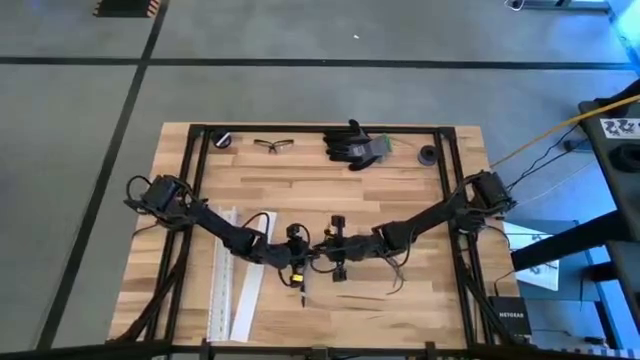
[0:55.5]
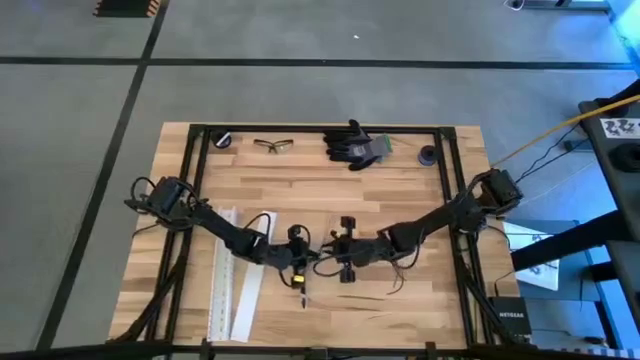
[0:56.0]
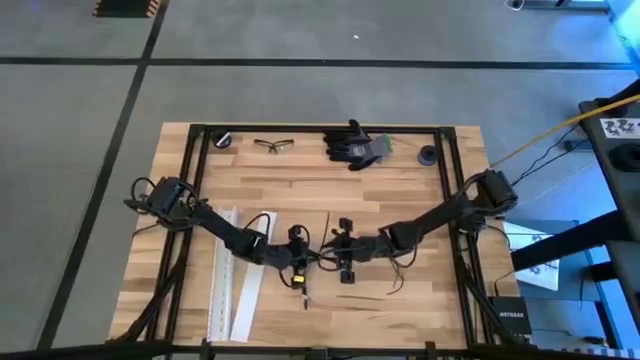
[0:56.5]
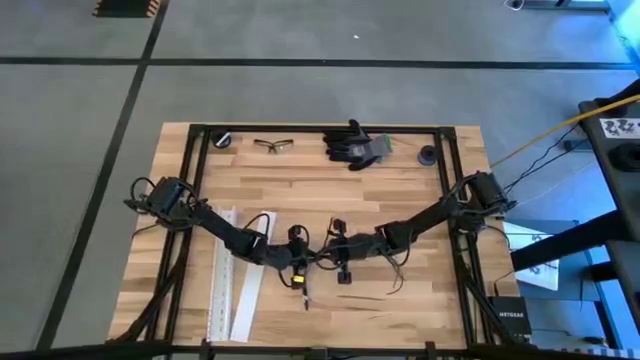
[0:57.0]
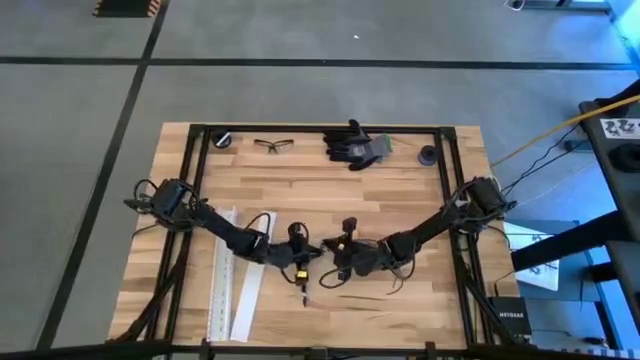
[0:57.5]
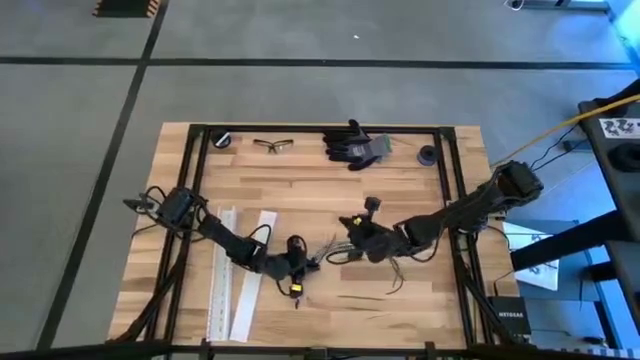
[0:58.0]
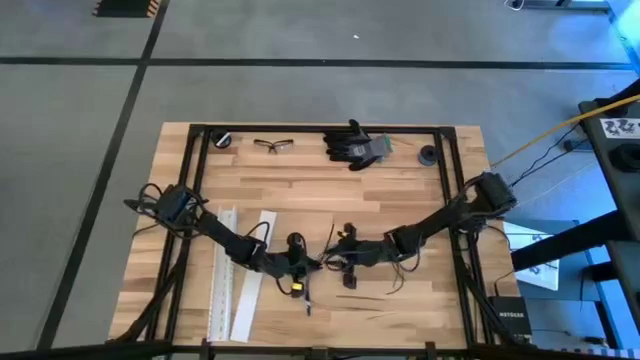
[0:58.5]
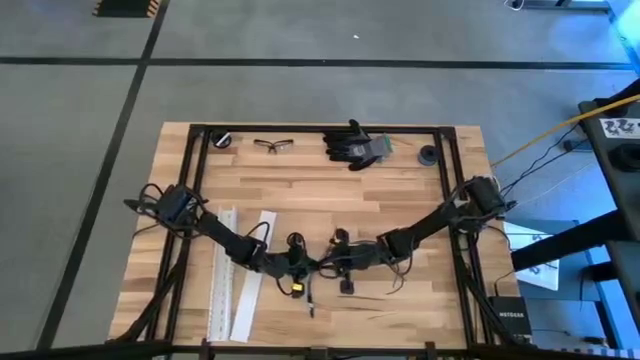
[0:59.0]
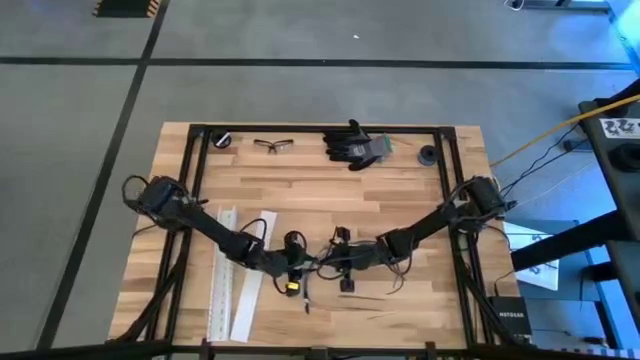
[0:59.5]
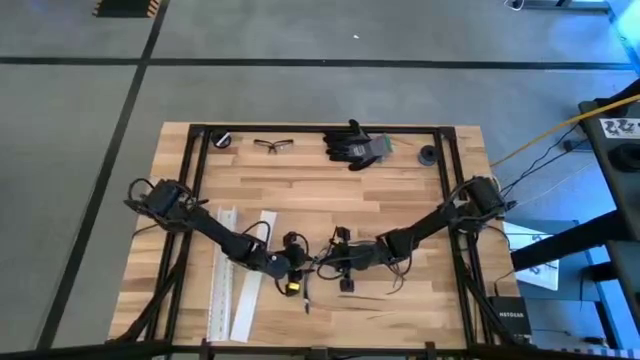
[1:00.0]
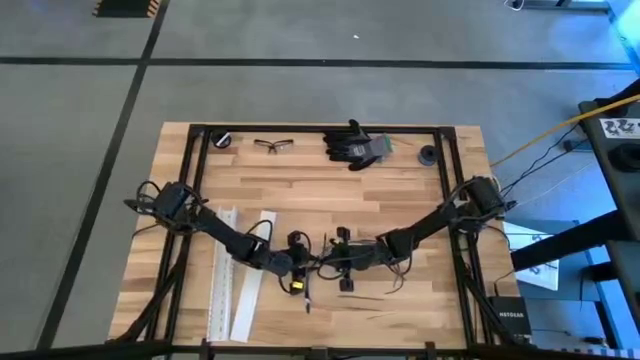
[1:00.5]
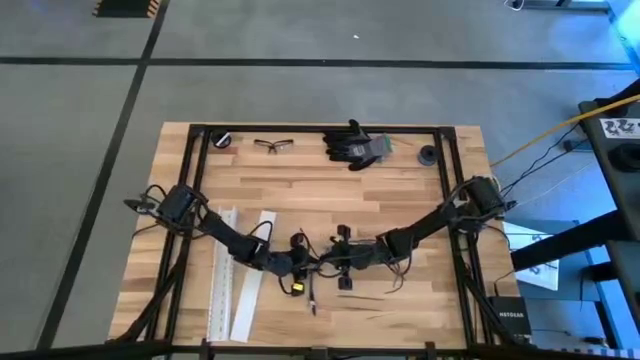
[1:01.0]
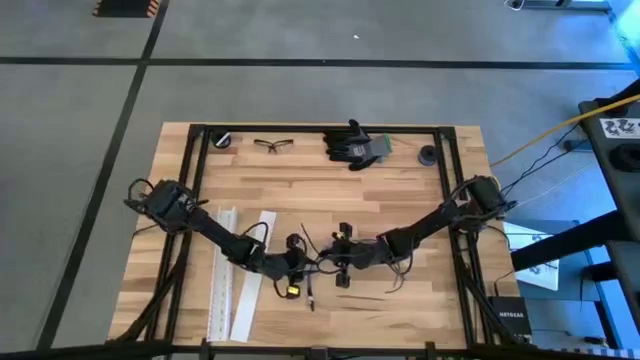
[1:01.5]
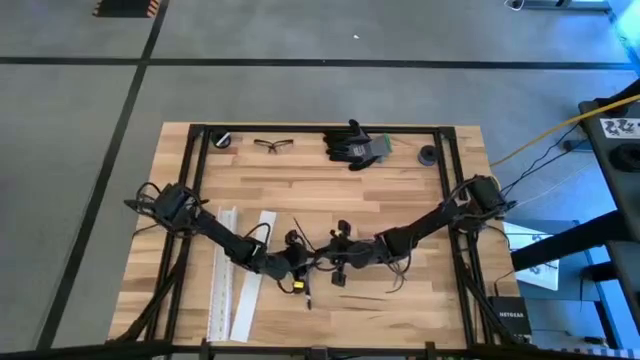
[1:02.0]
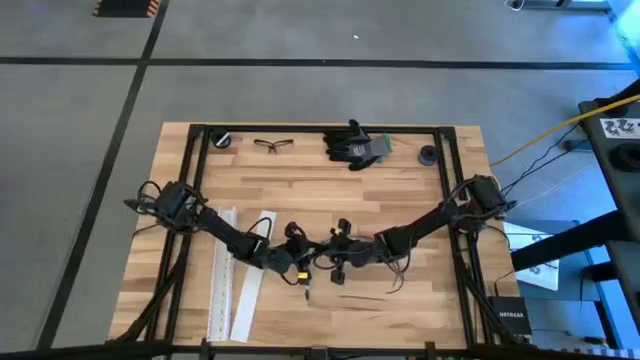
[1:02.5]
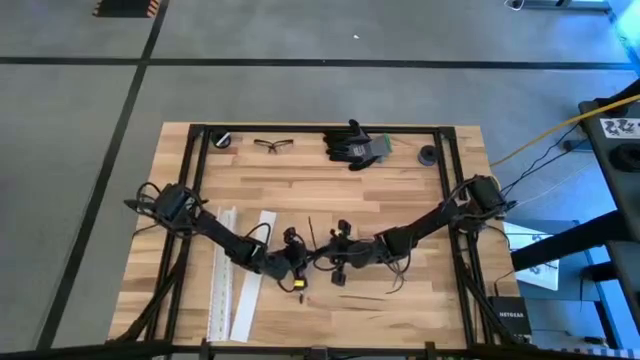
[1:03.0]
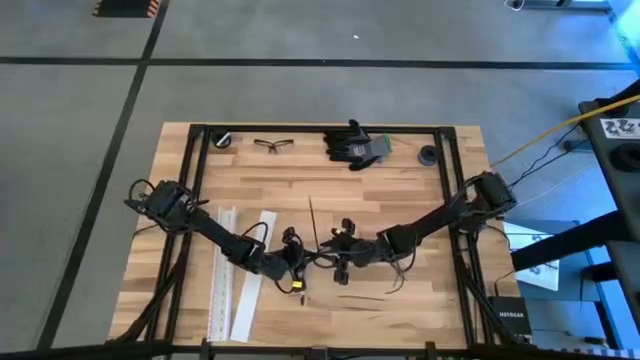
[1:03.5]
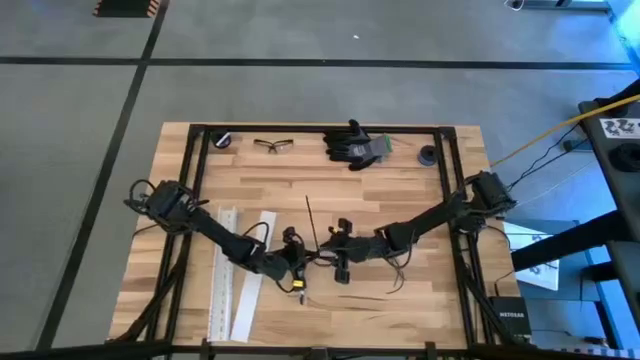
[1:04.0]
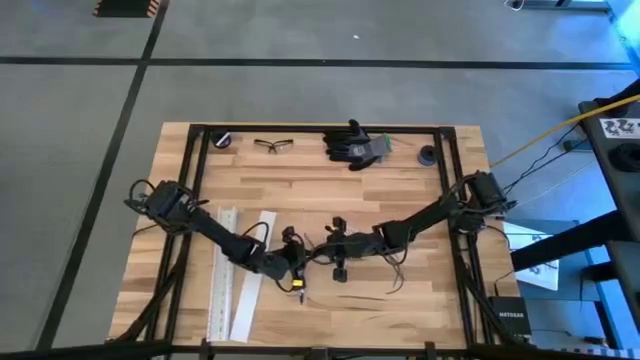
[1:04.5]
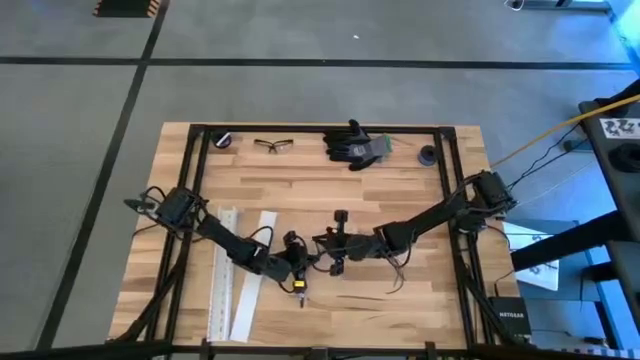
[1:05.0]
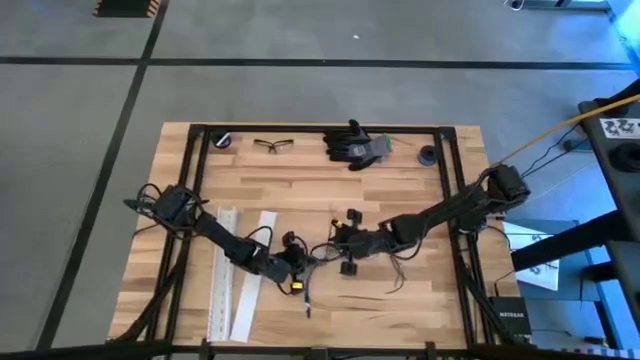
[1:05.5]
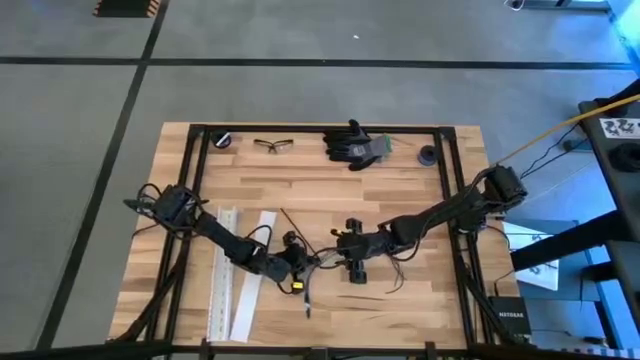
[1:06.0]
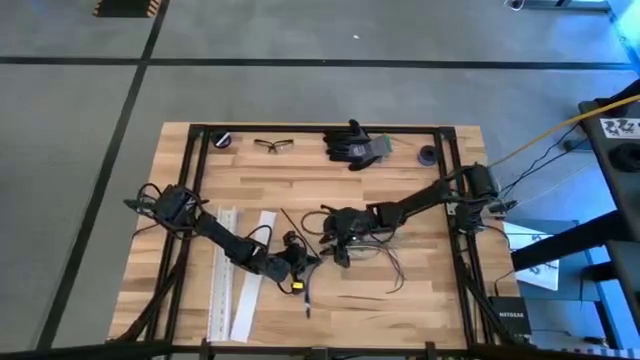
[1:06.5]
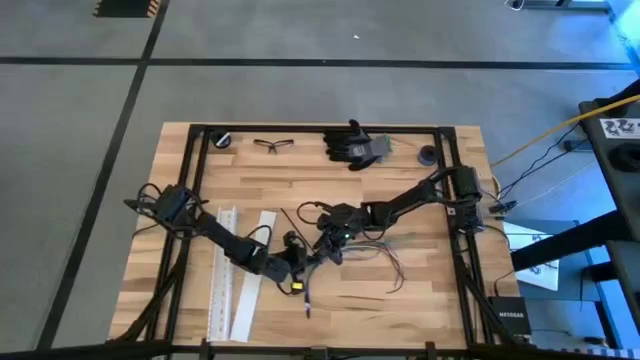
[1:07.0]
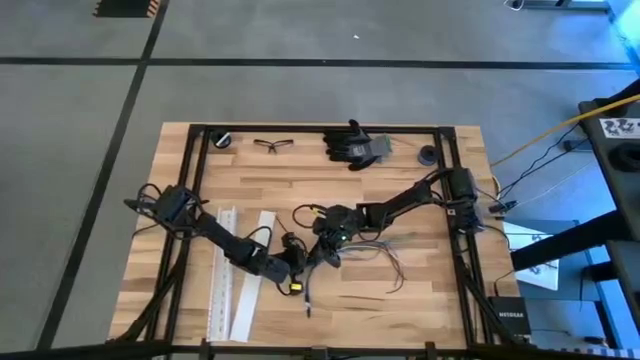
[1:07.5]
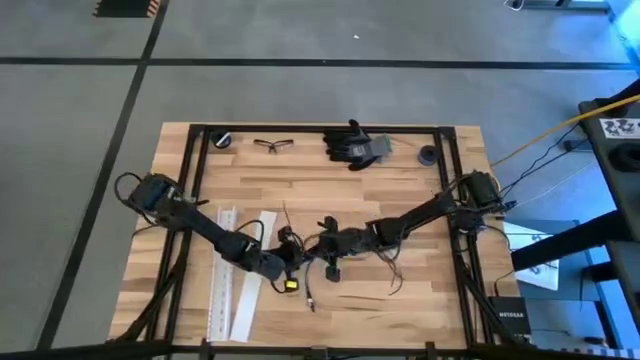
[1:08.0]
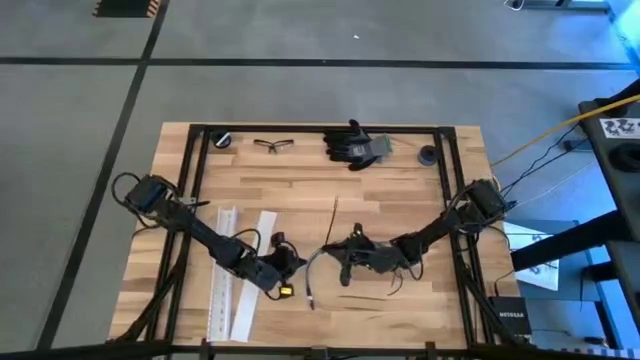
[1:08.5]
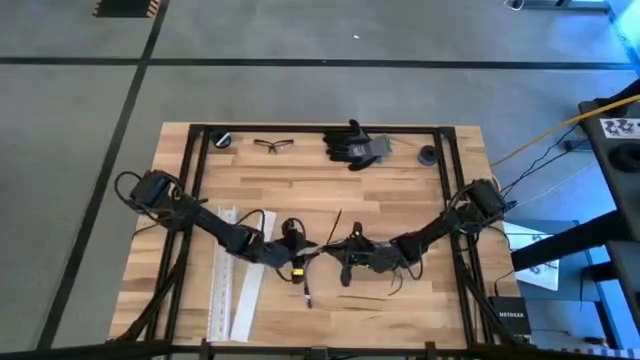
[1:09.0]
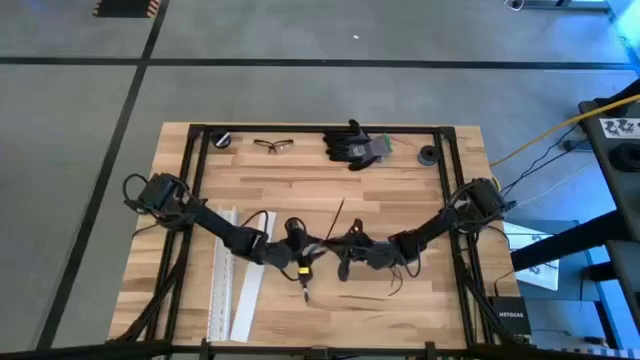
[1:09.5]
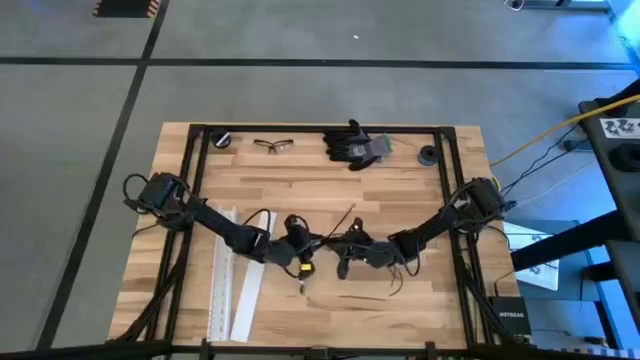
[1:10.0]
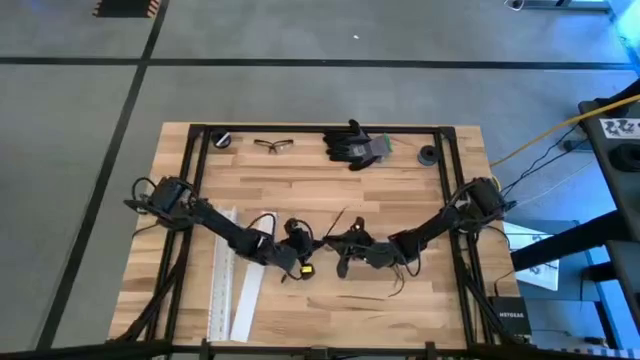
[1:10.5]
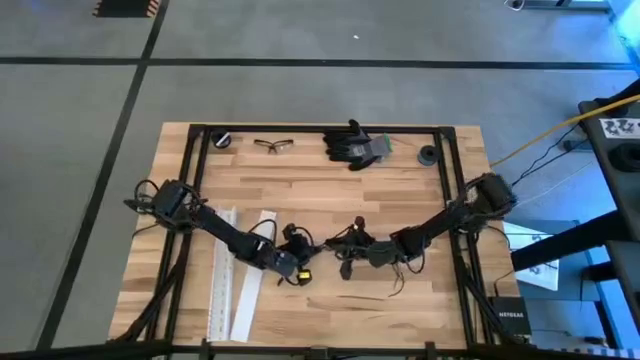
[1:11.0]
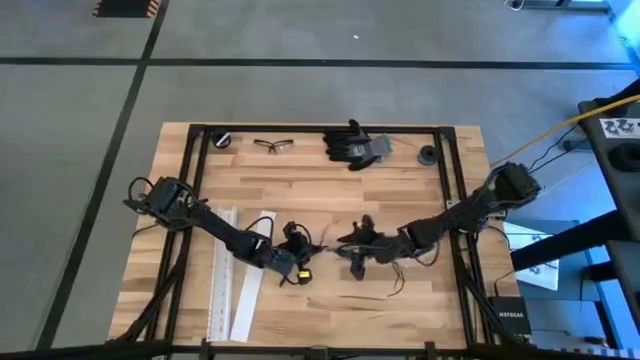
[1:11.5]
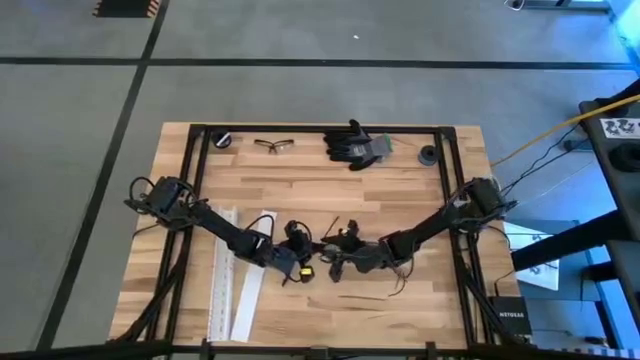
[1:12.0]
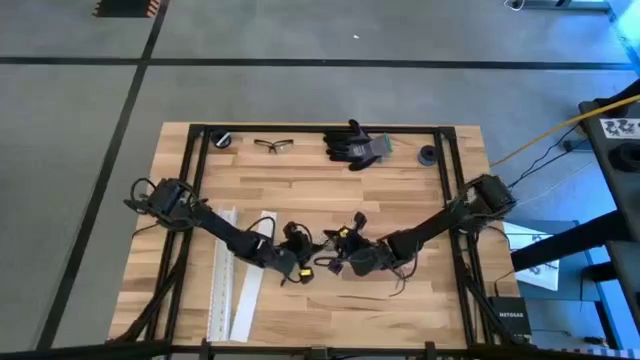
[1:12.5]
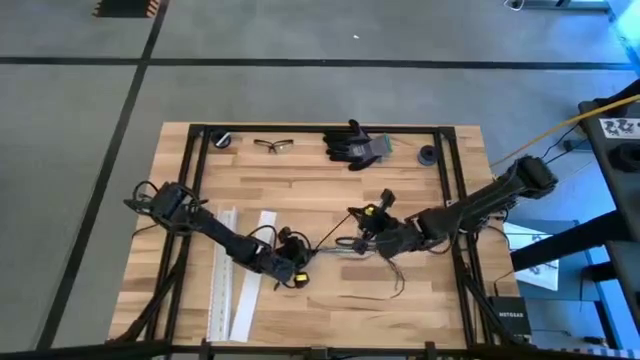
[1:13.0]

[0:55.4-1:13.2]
Task: Ziptie cables
Wrap the black zip tie around the cable wires to form a loop

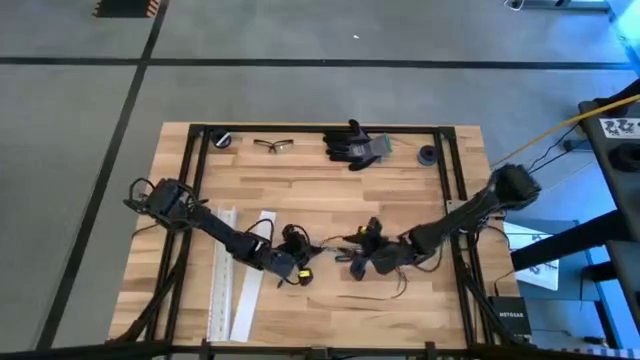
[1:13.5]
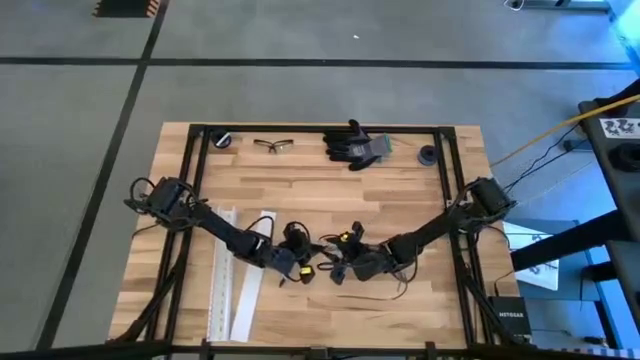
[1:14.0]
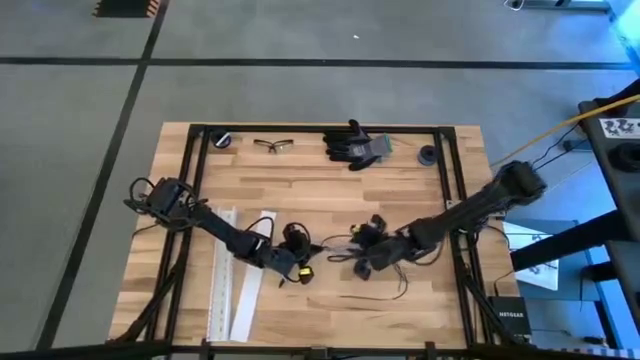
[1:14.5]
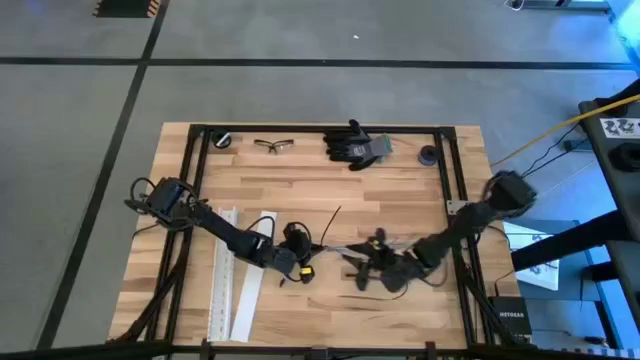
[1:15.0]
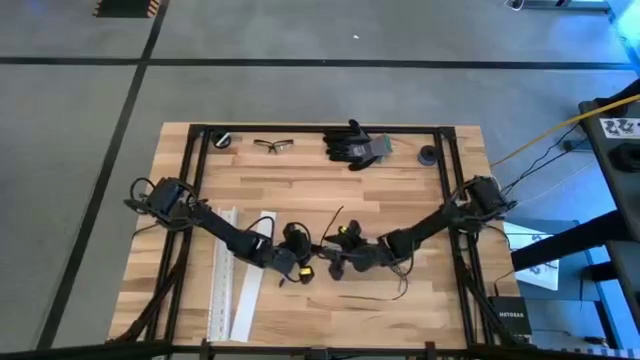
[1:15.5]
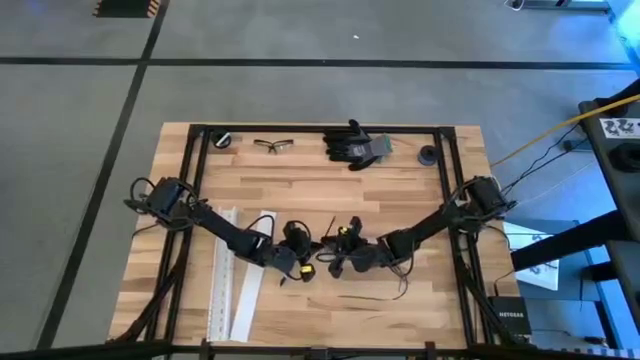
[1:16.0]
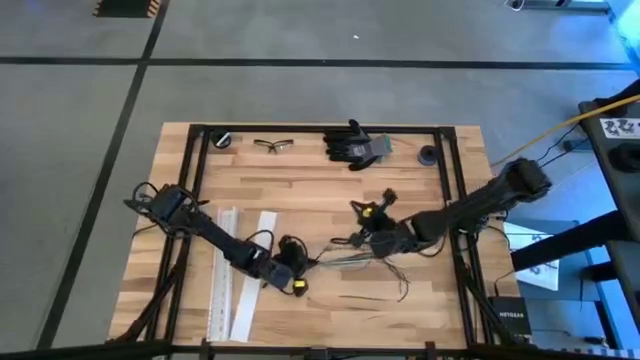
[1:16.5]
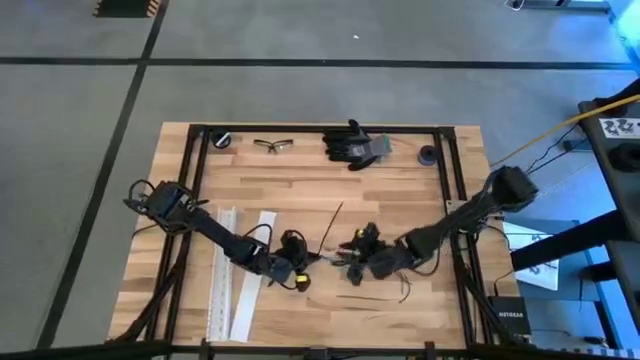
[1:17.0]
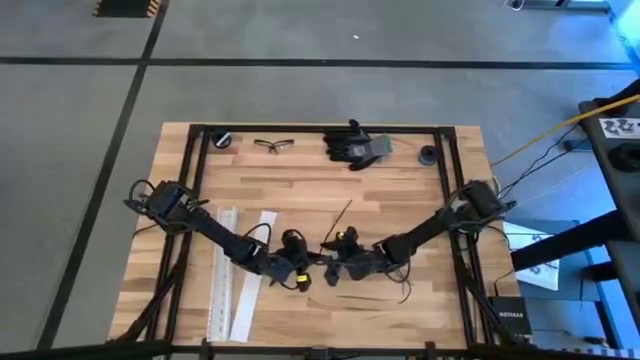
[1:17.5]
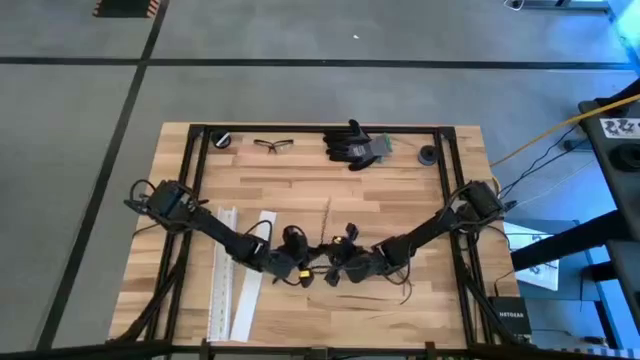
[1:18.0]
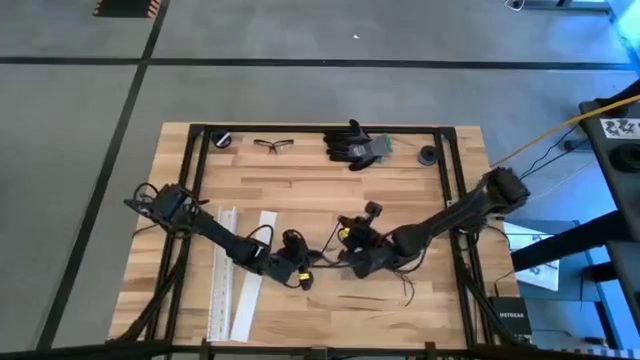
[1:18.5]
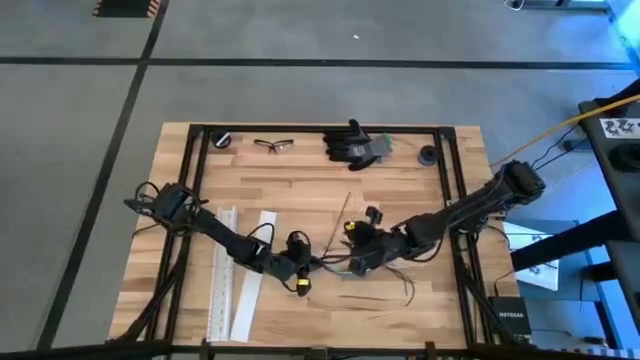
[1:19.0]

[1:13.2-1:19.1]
Wrap the black zip tie around the cable wires to form a loop
